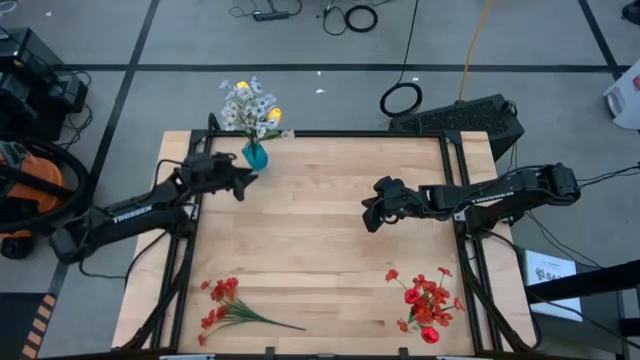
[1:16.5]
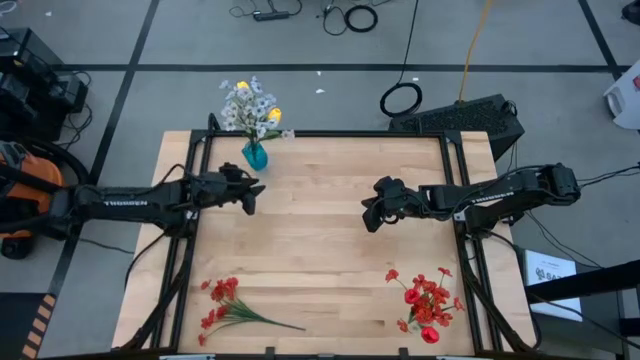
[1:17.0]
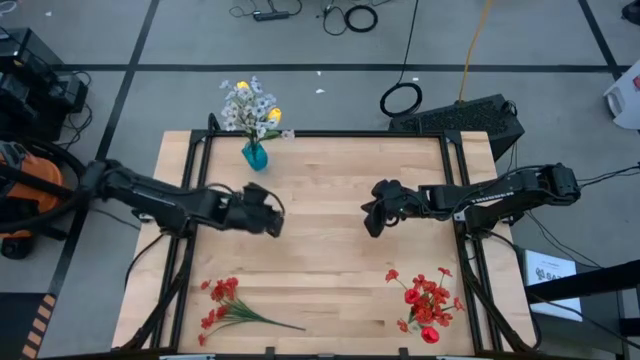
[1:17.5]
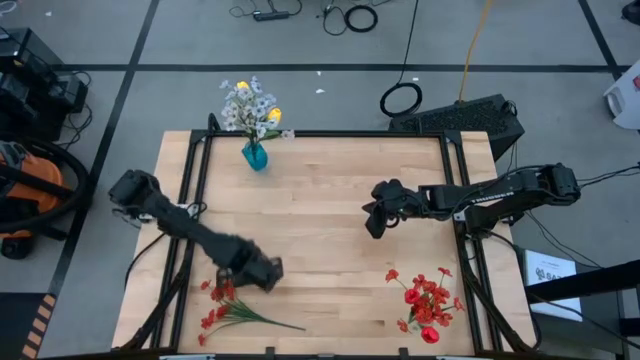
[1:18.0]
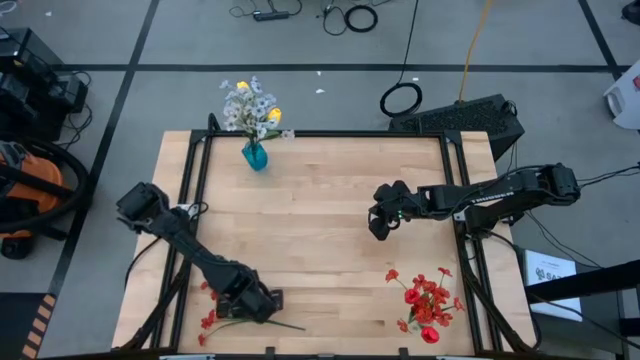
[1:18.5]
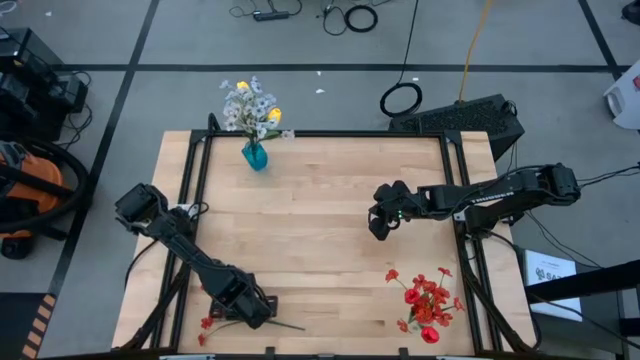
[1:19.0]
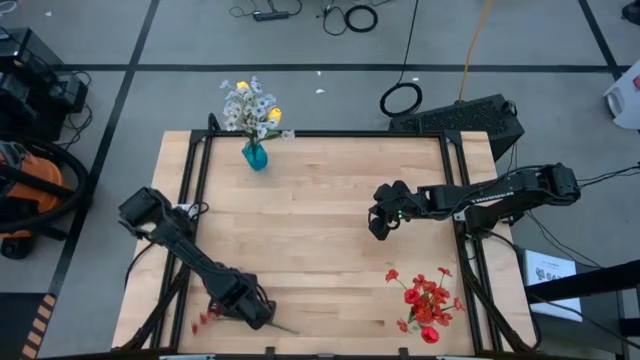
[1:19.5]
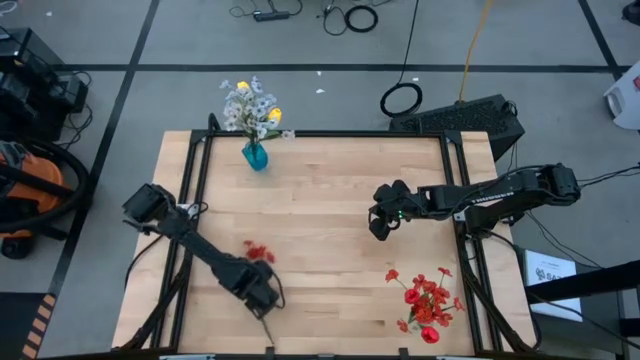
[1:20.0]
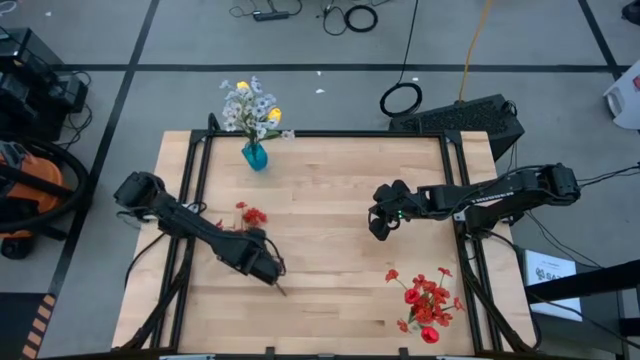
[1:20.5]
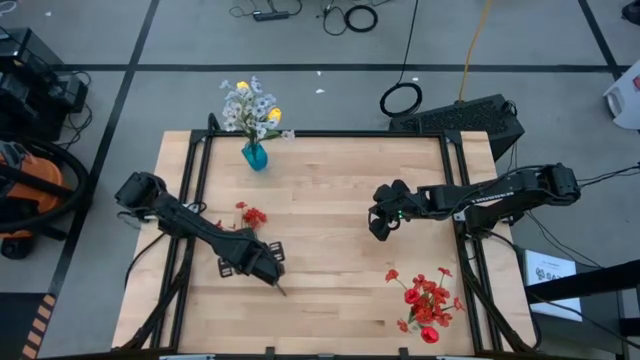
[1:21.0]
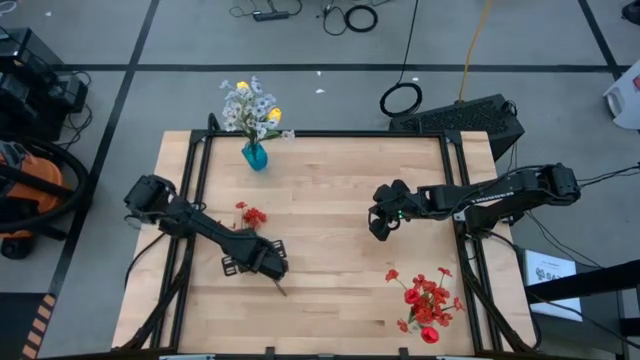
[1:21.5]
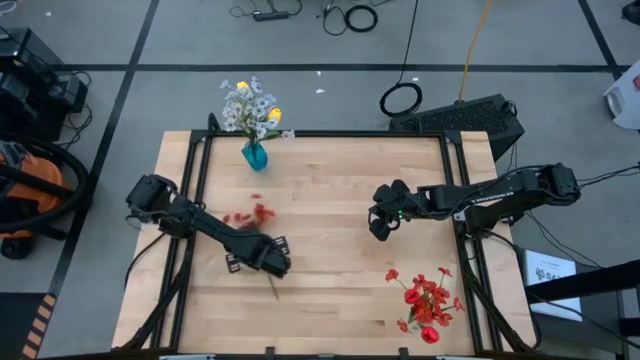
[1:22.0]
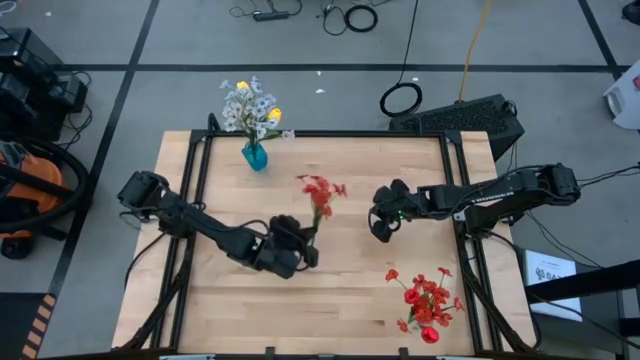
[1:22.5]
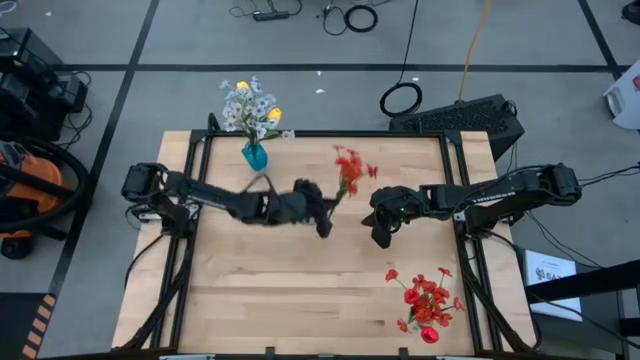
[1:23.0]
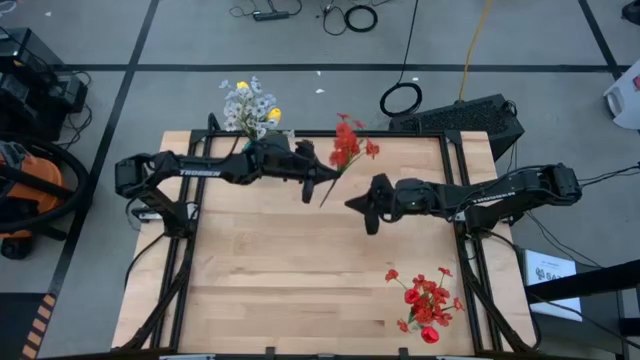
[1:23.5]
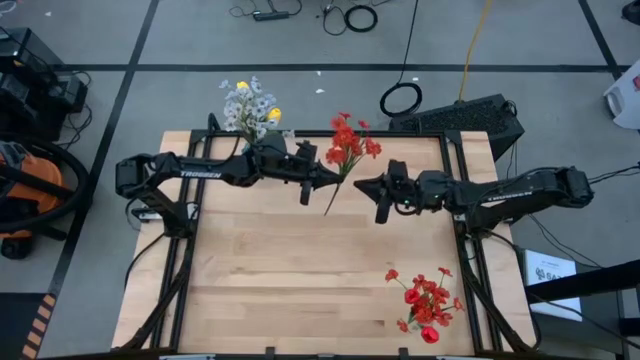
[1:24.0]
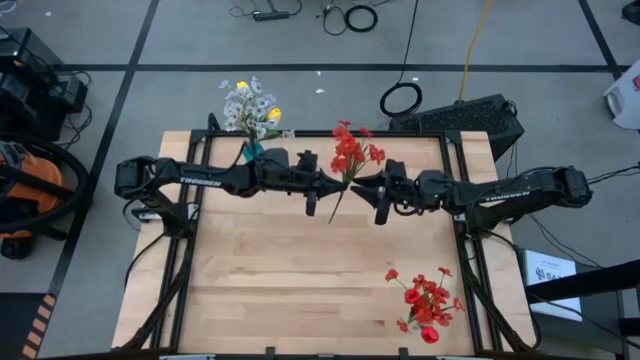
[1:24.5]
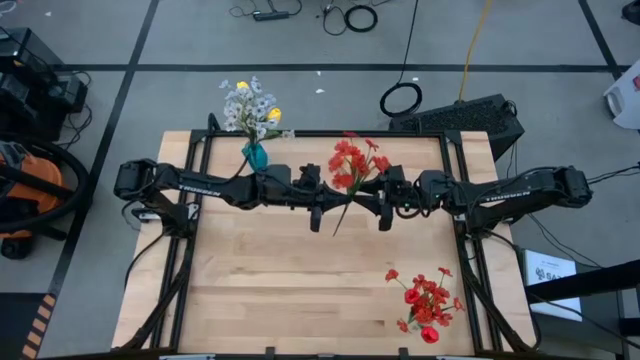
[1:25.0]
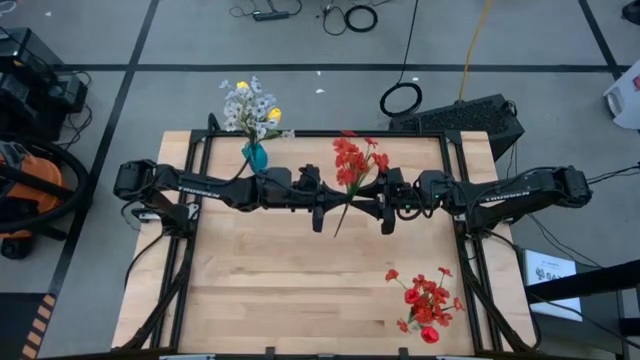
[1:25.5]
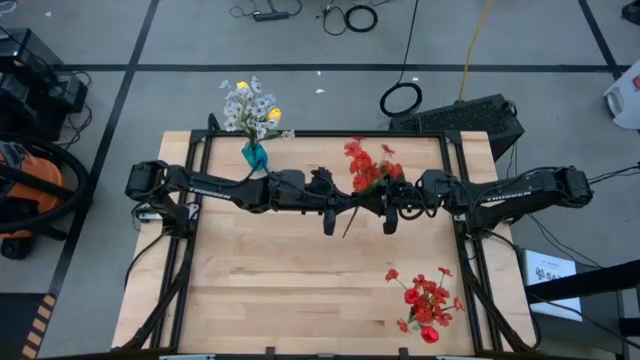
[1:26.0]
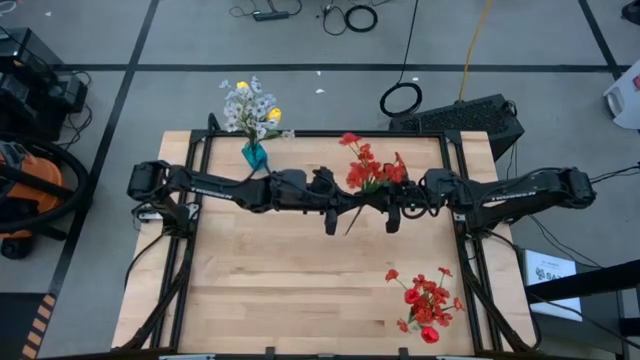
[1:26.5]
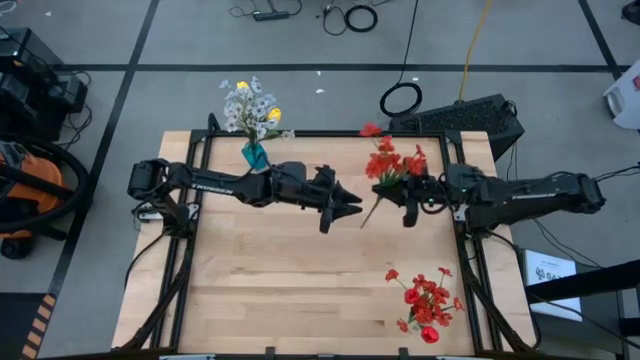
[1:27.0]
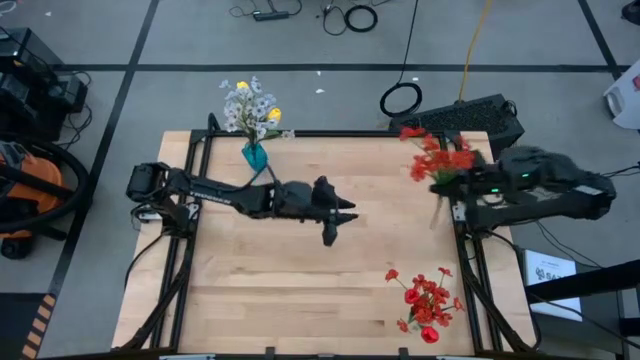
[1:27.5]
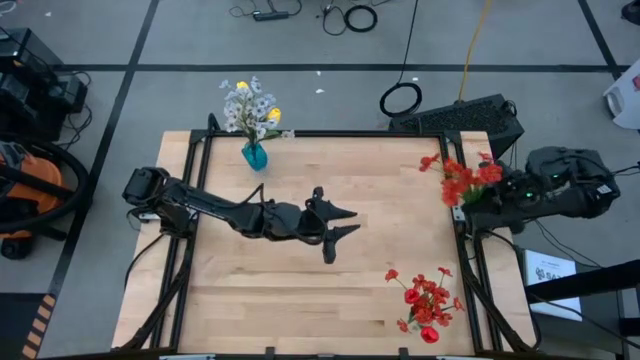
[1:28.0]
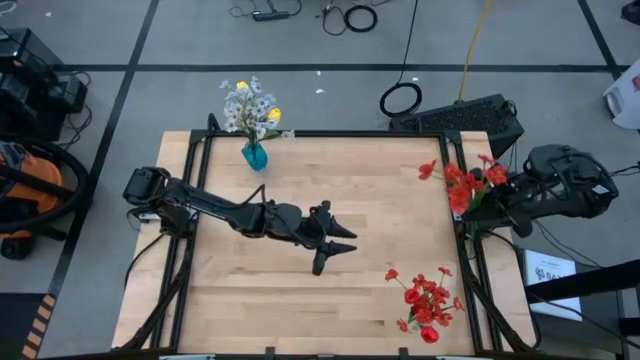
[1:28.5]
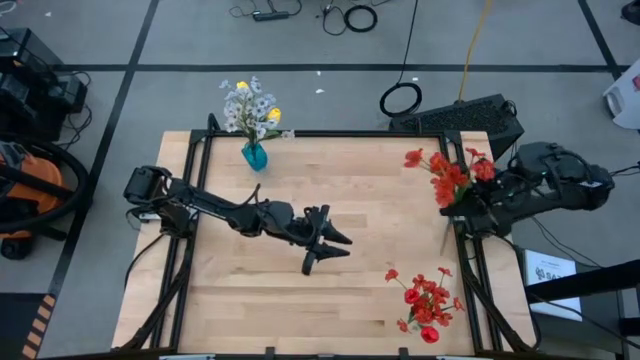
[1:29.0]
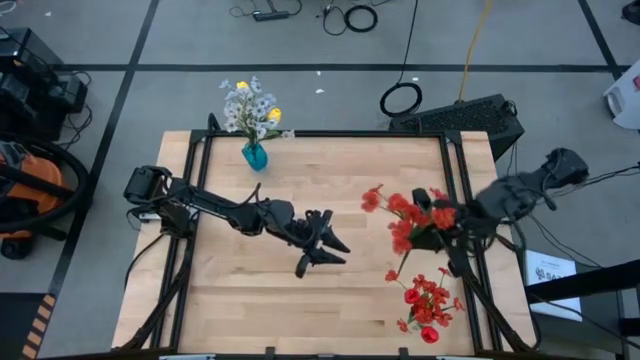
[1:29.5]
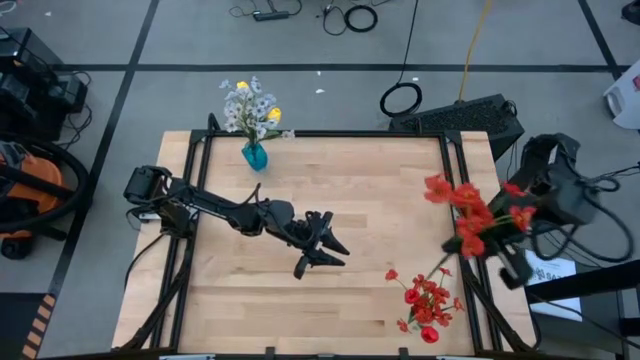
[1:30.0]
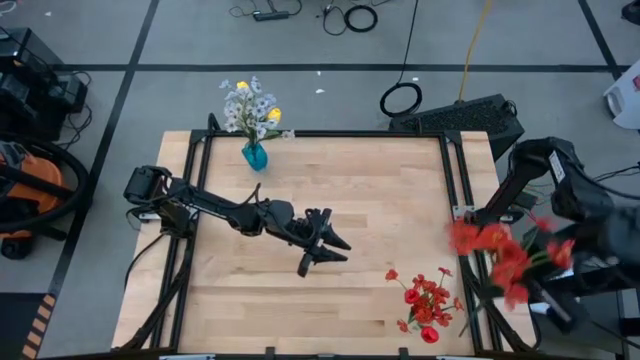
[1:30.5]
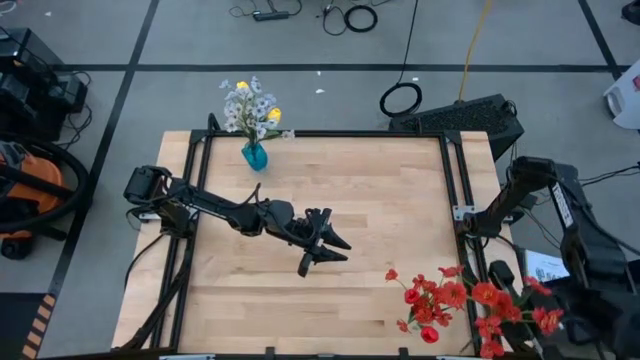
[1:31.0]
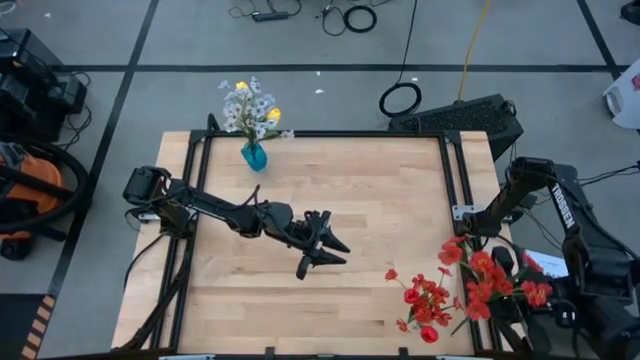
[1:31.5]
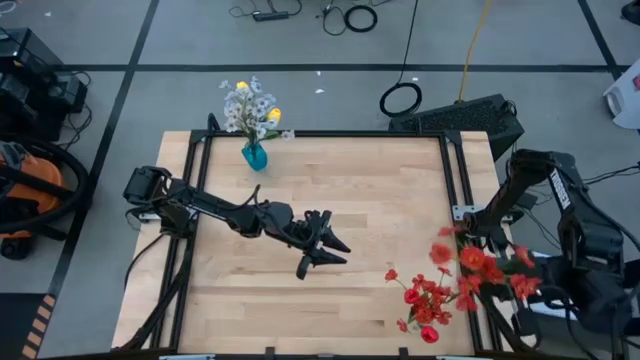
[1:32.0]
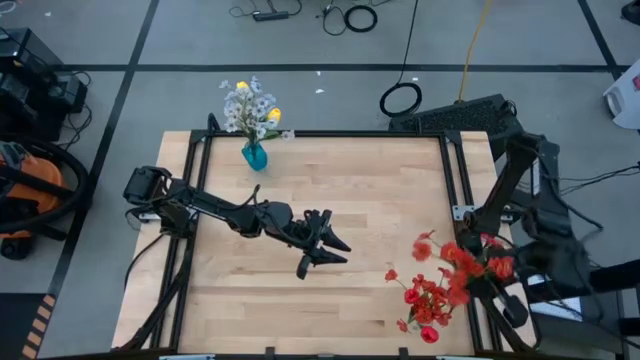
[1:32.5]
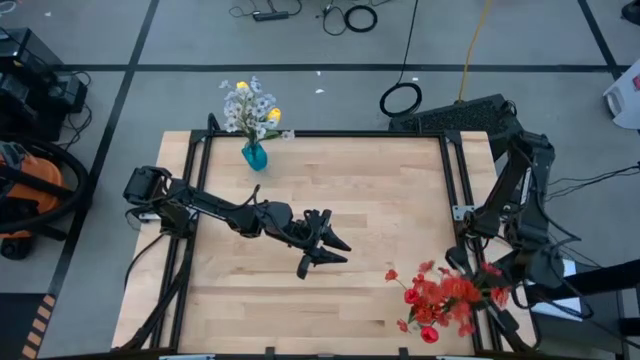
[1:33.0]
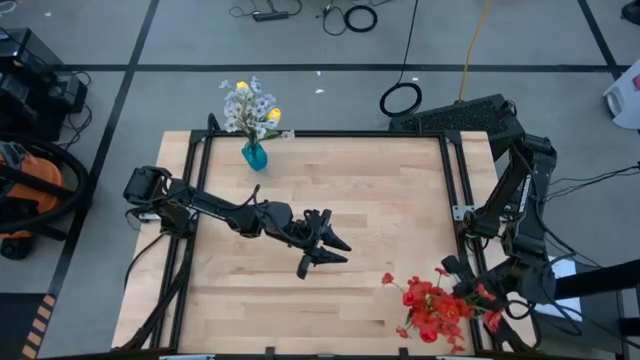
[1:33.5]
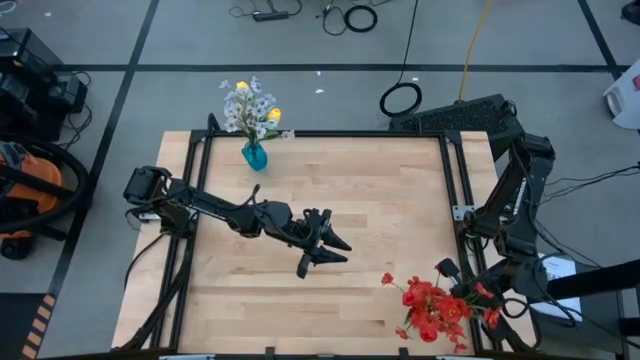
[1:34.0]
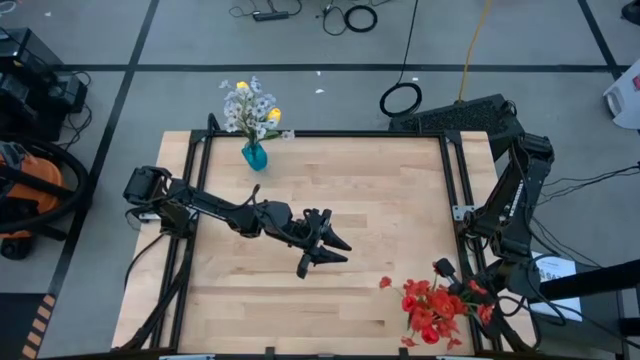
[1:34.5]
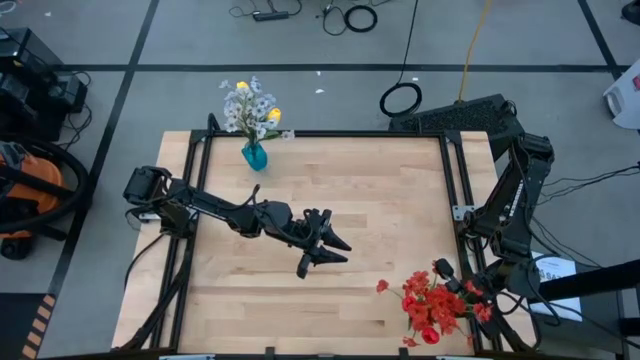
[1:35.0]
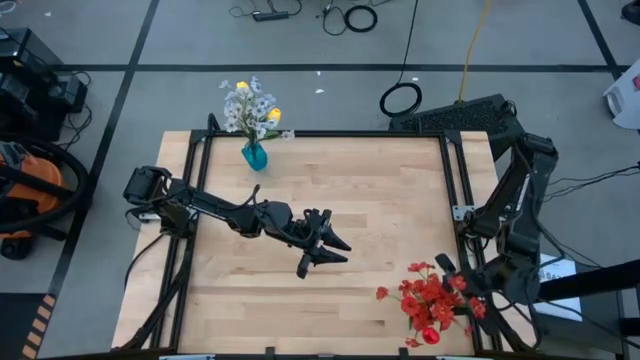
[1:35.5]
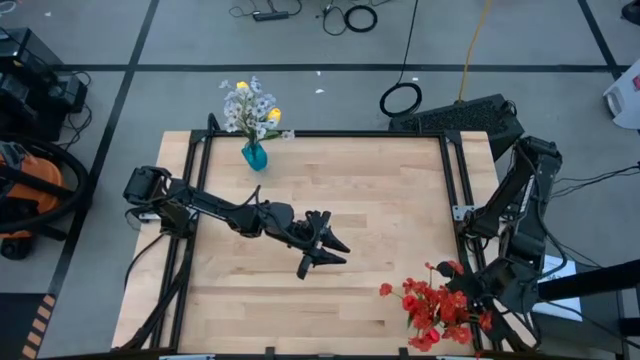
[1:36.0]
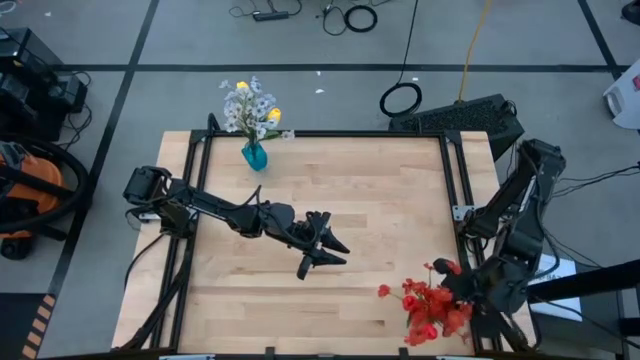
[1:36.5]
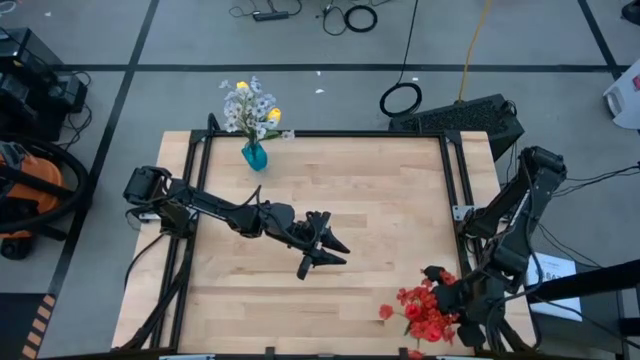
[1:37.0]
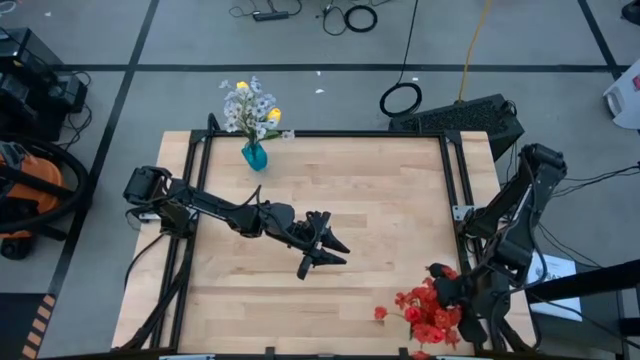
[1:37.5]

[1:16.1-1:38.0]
Task: Sort flowers into vase by color
Put the orange flowers into the transparent vase

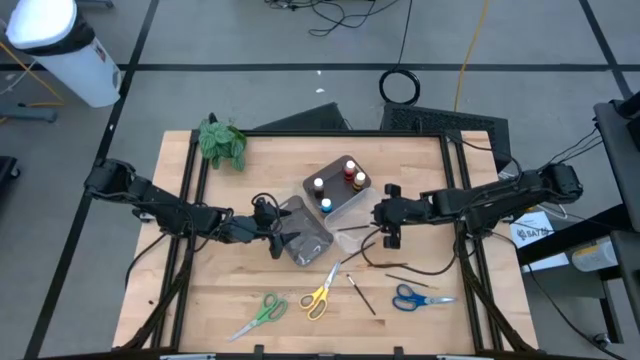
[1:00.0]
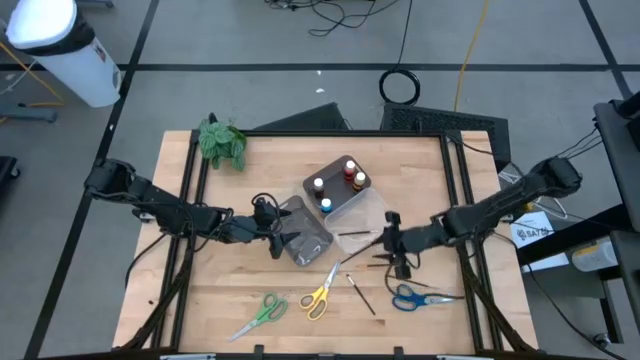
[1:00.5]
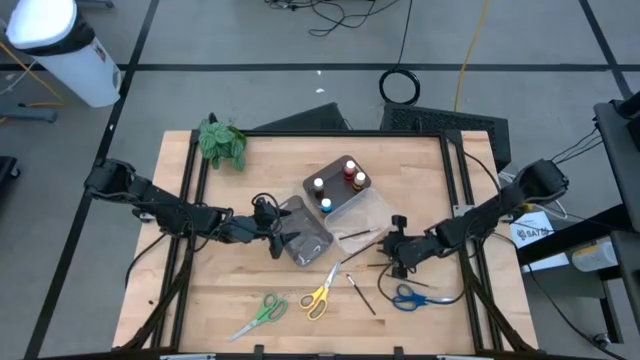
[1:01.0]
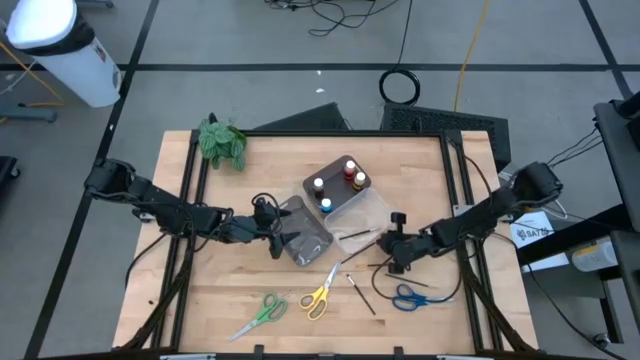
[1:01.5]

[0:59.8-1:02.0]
Task: Pick & Place Paint Supplies
Put the top gold paintbrush into the transparent bin
